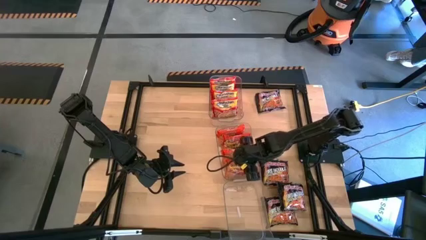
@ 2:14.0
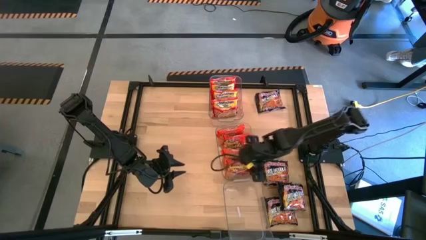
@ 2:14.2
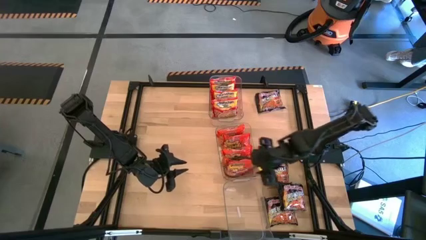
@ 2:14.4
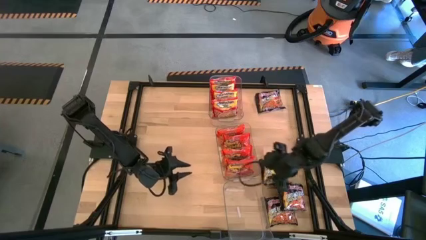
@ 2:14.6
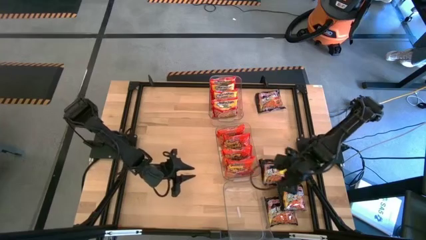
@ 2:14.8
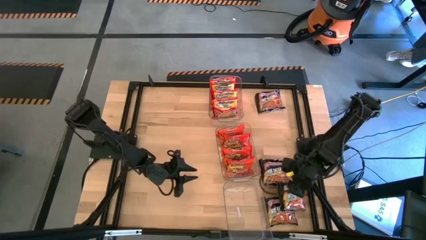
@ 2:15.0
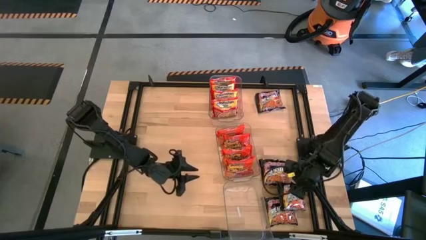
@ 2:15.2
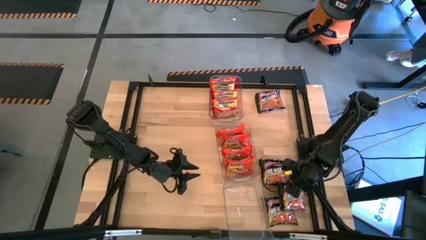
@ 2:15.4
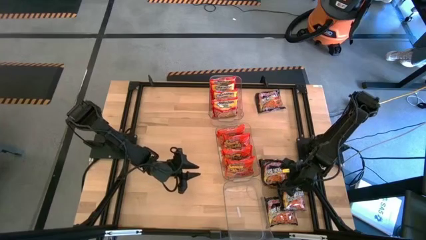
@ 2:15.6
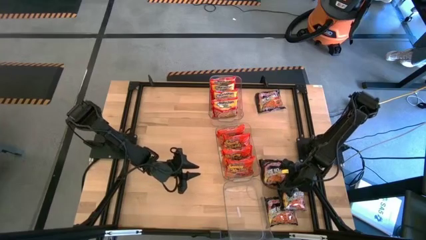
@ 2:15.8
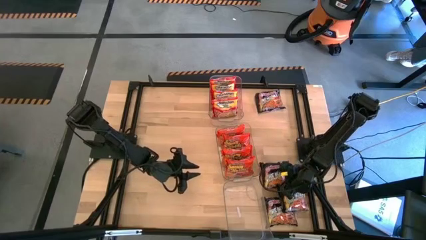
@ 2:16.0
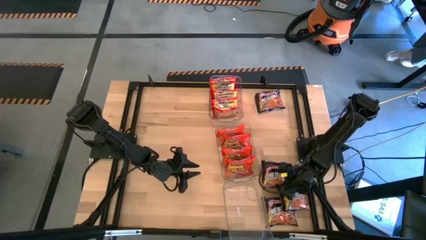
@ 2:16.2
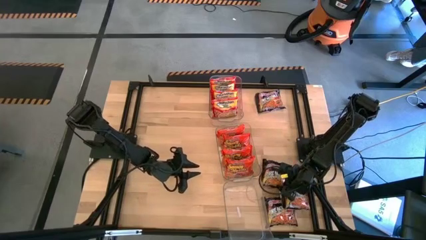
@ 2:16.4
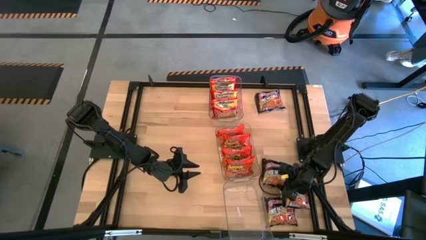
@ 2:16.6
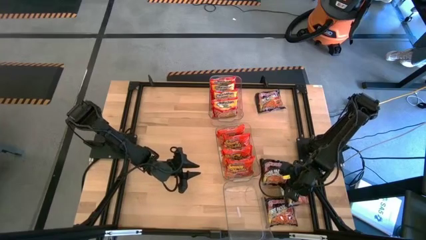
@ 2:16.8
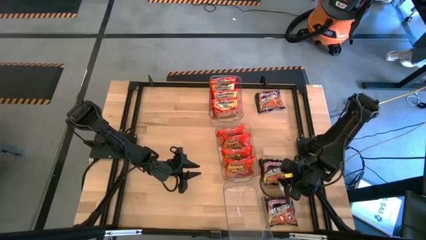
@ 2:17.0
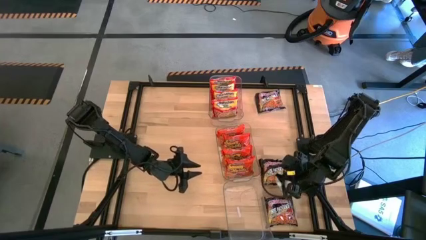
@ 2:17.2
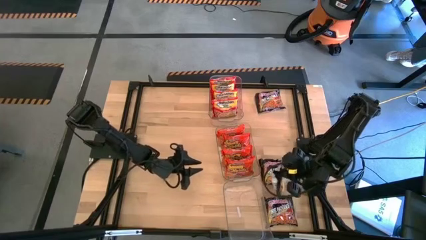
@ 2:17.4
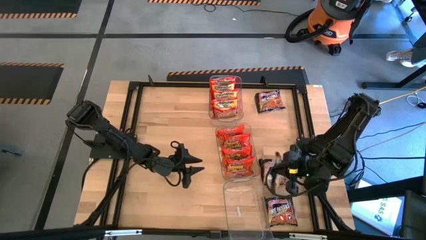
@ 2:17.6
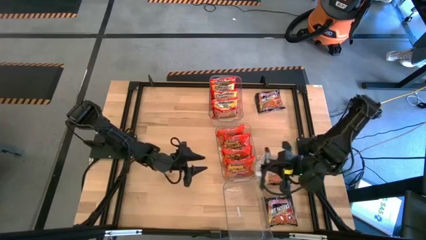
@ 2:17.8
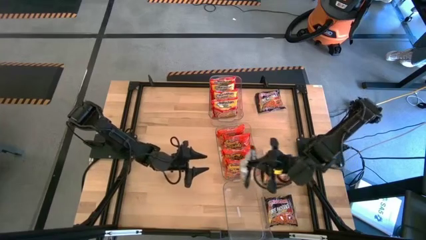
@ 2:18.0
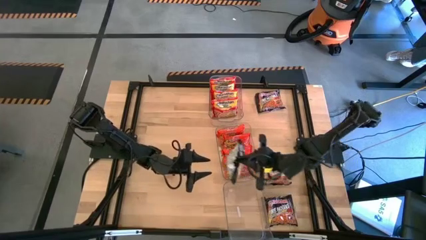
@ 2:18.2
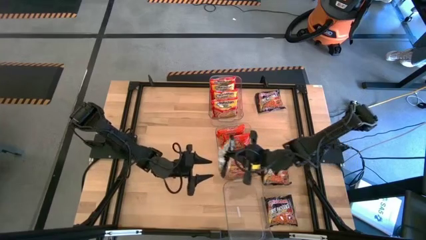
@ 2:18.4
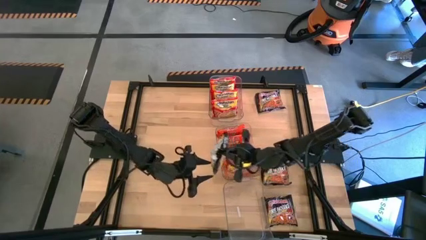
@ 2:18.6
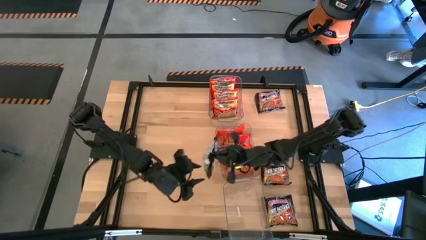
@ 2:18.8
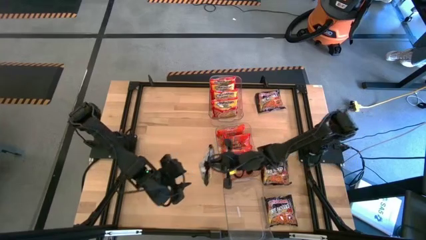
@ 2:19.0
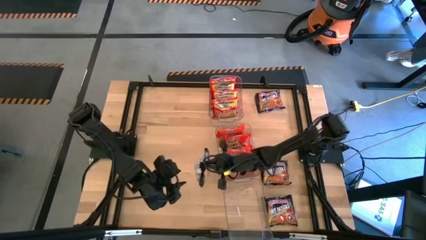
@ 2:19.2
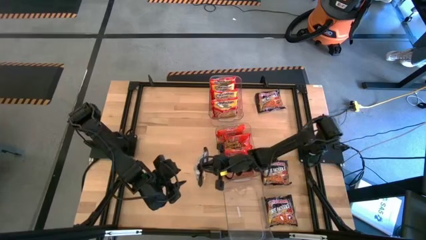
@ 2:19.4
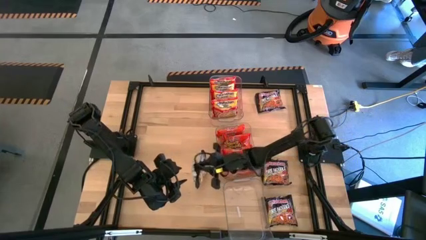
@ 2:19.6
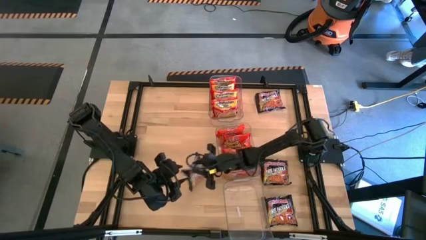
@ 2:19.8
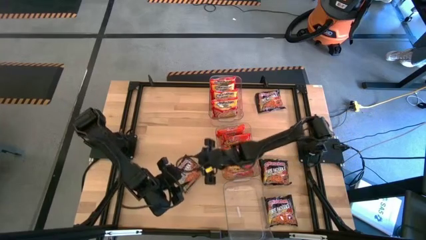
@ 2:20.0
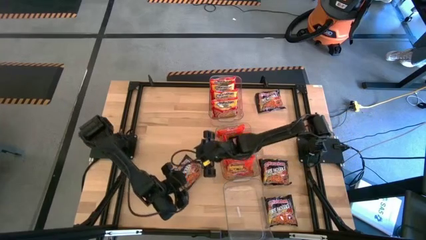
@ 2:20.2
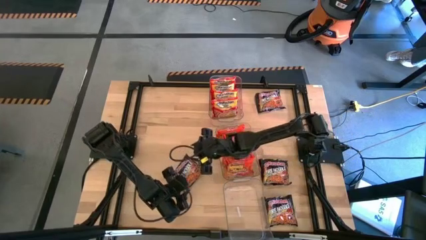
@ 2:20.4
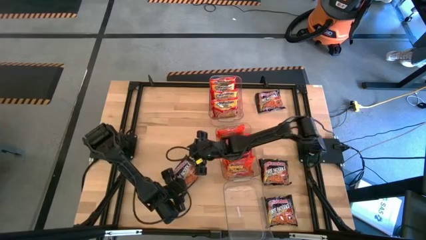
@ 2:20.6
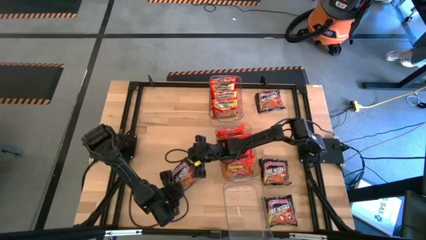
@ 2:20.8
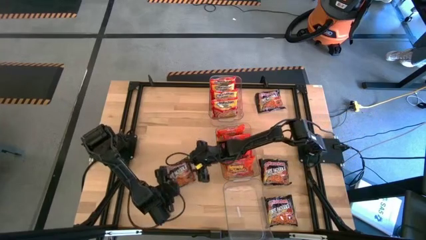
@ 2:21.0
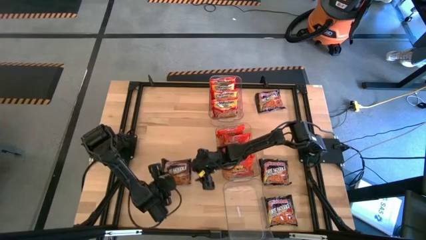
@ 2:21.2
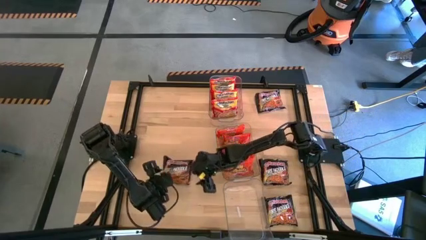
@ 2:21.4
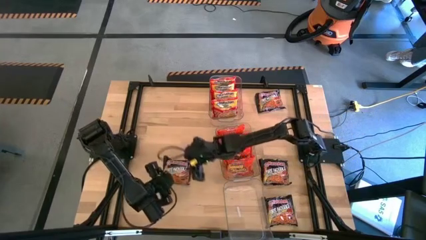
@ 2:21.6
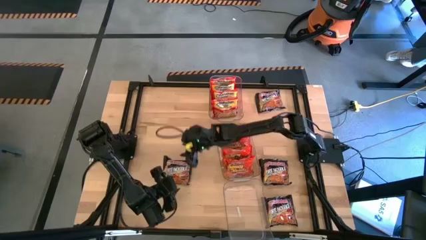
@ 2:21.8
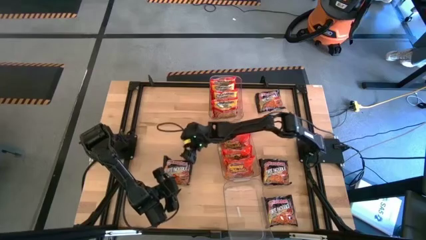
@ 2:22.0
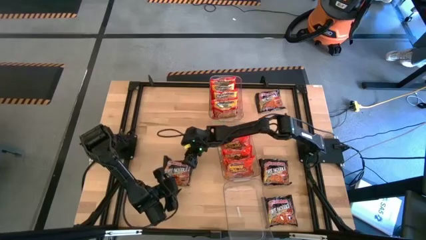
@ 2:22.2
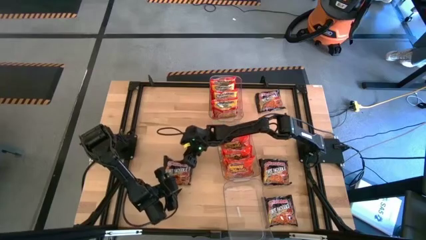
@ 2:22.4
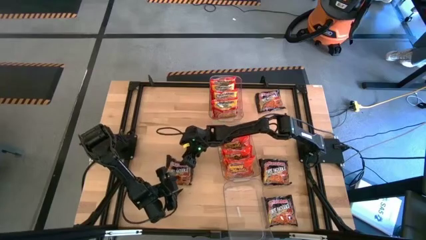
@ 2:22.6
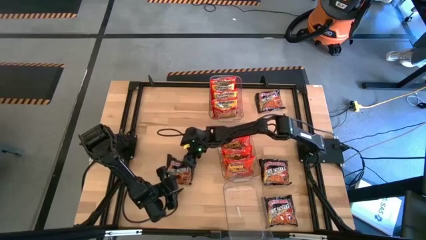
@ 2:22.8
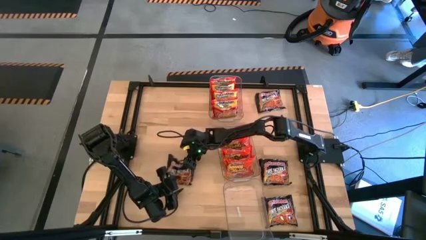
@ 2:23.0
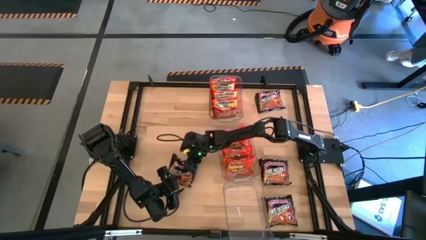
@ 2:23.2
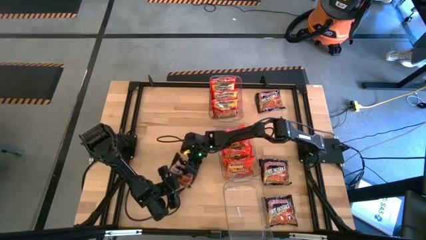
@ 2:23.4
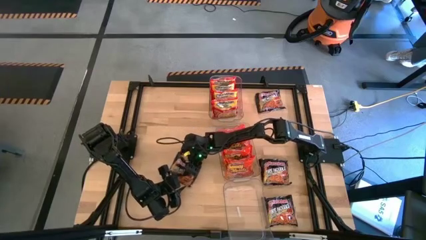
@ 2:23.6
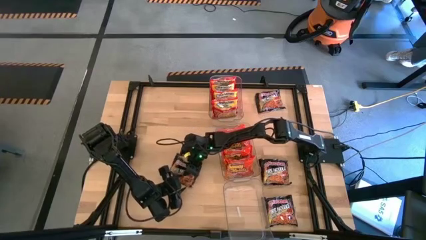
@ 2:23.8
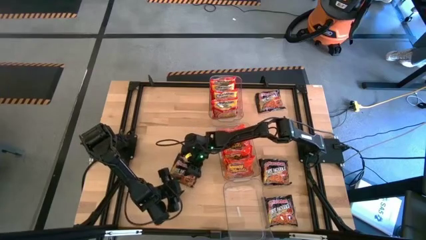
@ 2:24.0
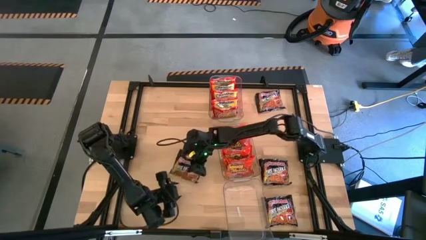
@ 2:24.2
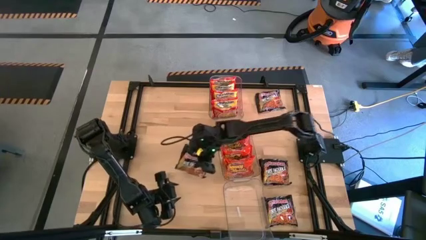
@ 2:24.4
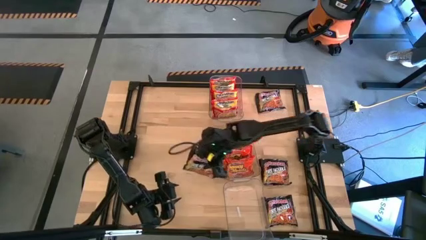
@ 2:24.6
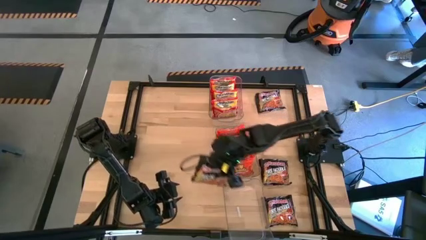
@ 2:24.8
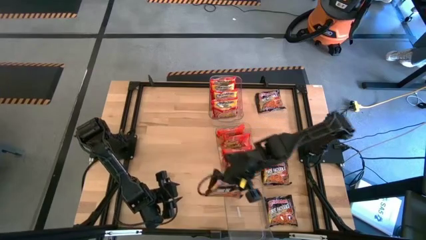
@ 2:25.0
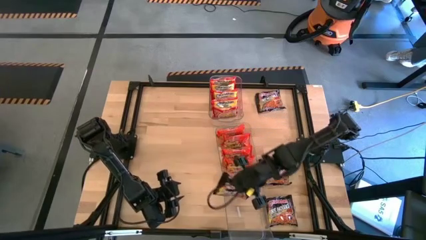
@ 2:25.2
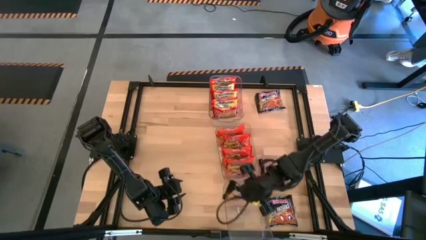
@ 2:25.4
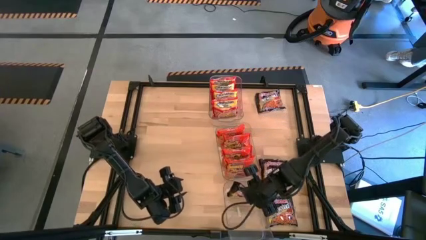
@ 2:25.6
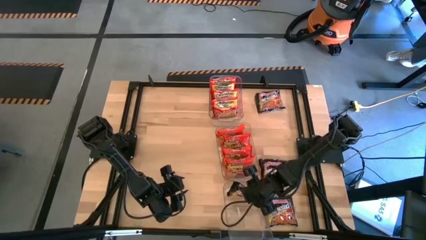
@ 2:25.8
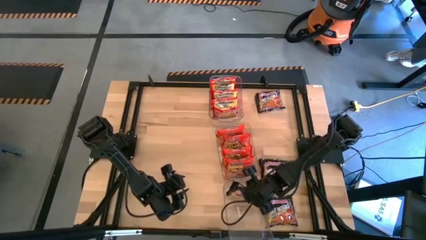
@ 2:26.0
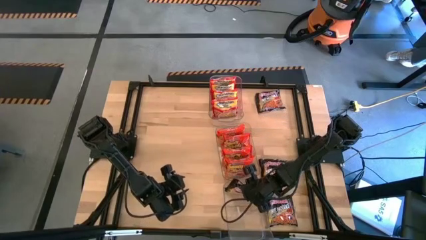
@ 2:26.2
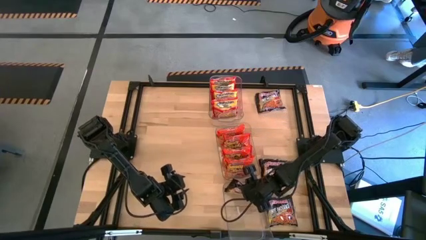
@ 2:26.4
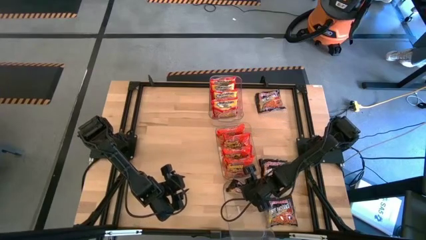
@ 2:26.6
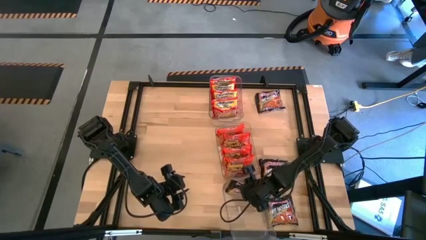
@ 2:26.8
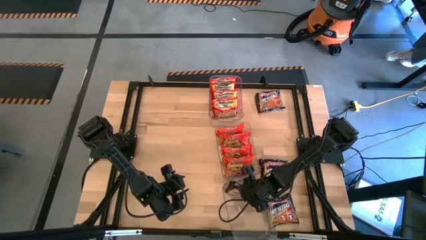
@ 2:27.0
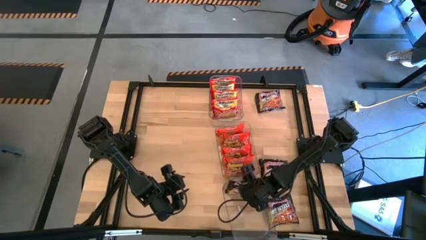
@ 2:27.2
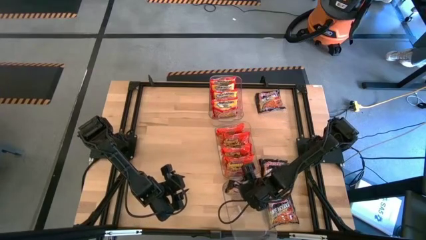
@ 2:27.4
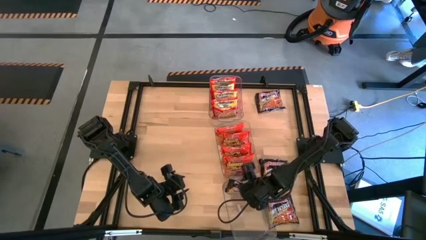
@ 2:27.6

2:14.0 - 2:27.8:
Task: Sort Maruchan noodles
Put the black noddle pack into the bottom transparent bin
